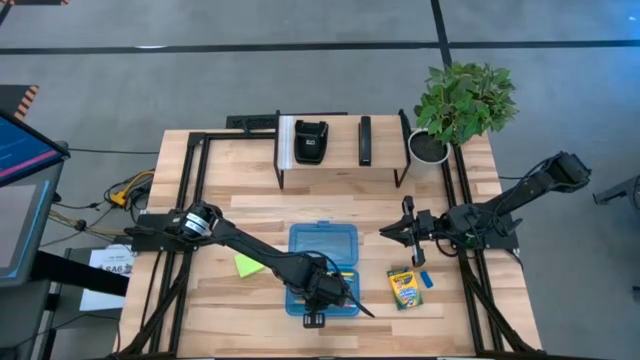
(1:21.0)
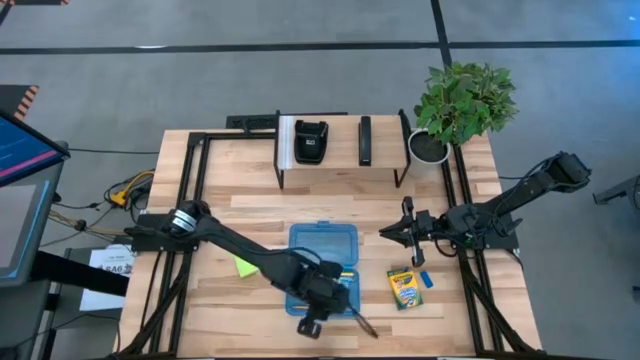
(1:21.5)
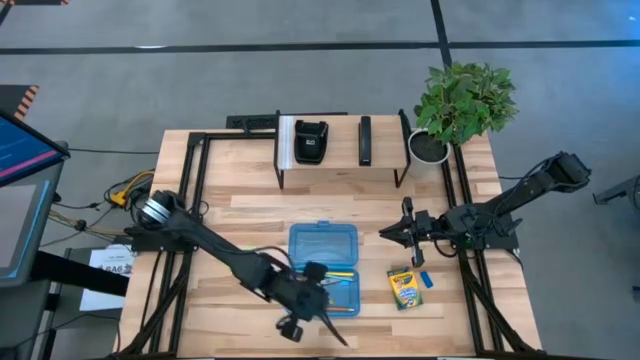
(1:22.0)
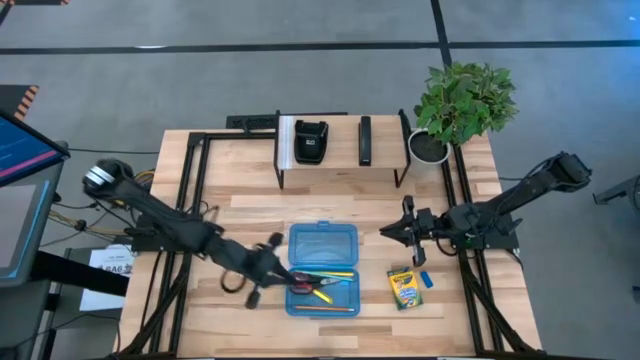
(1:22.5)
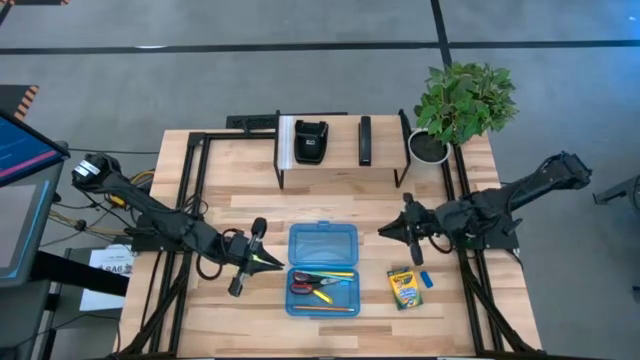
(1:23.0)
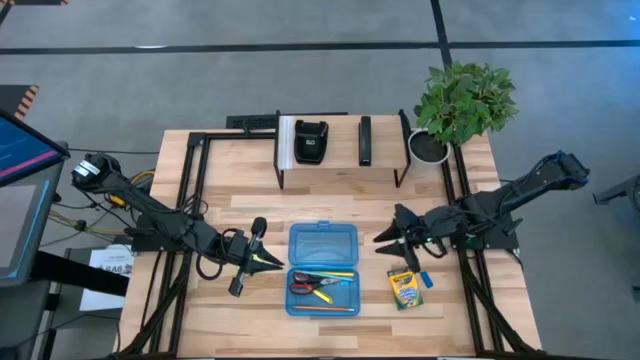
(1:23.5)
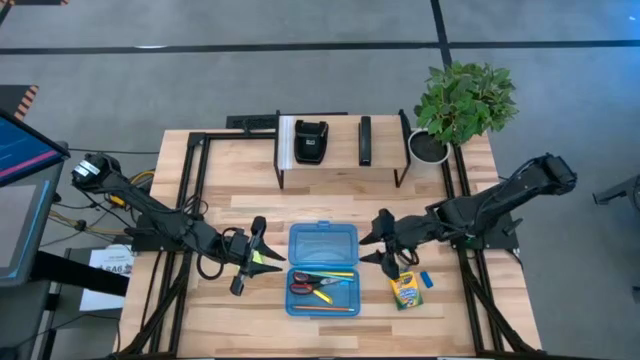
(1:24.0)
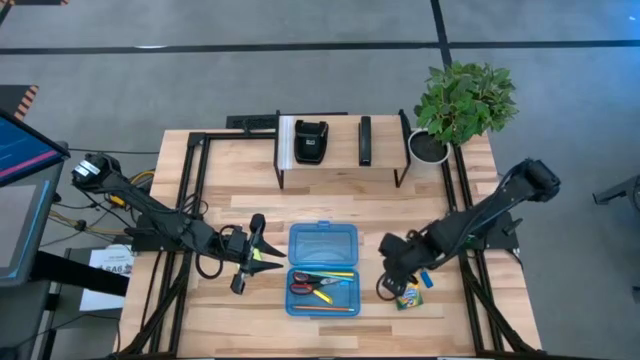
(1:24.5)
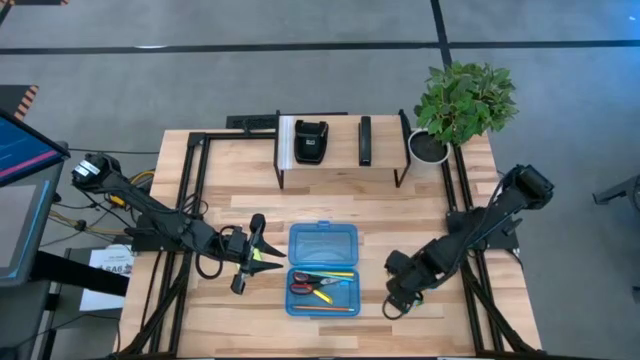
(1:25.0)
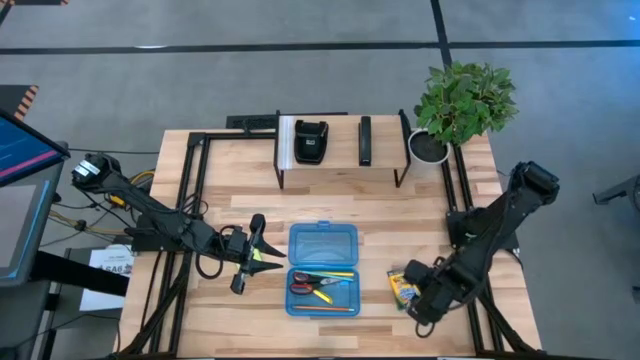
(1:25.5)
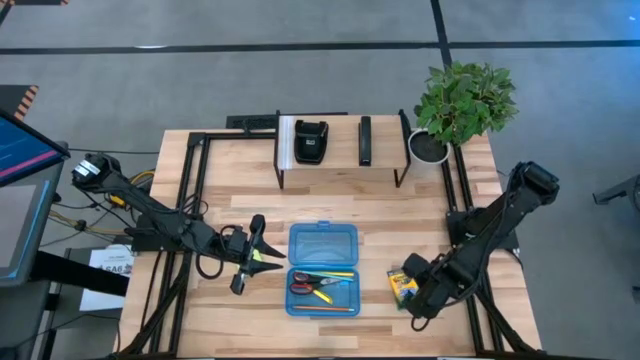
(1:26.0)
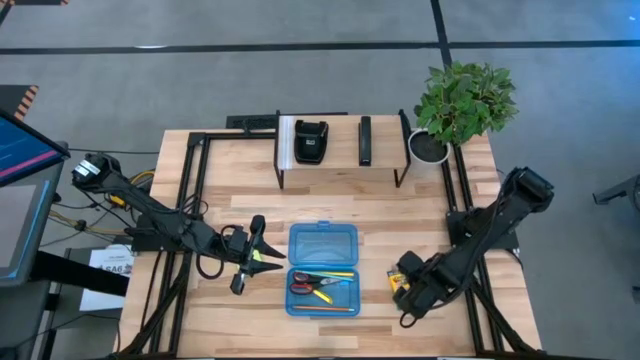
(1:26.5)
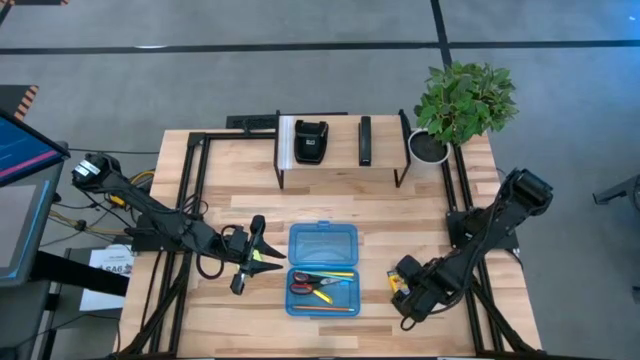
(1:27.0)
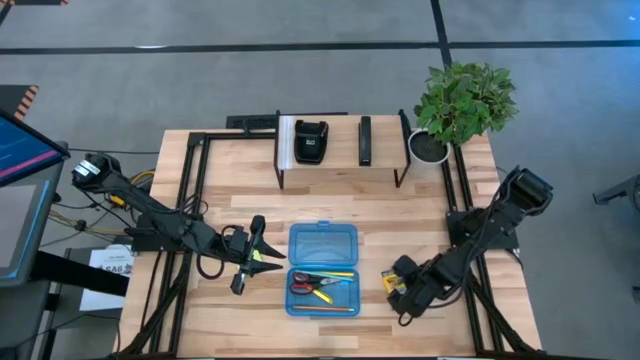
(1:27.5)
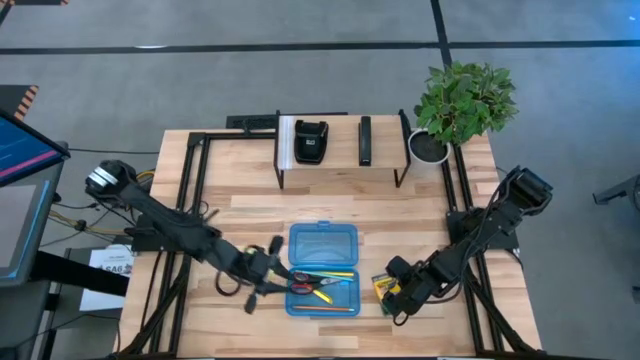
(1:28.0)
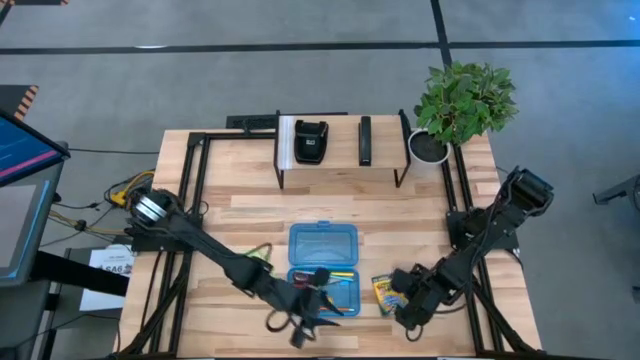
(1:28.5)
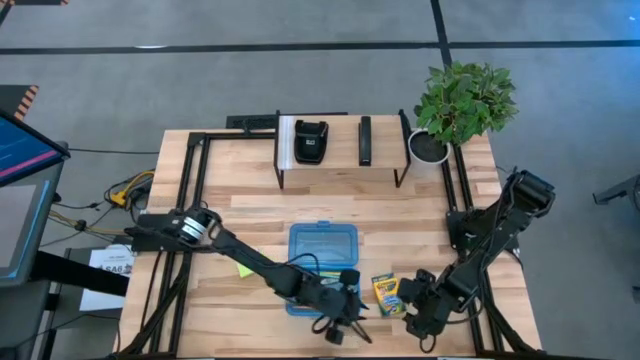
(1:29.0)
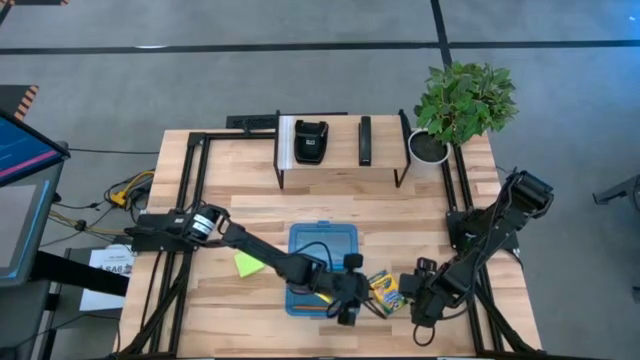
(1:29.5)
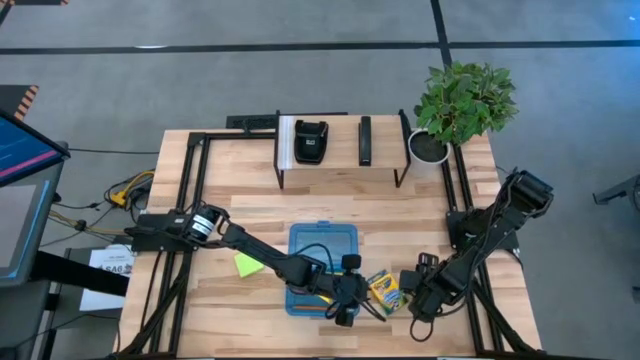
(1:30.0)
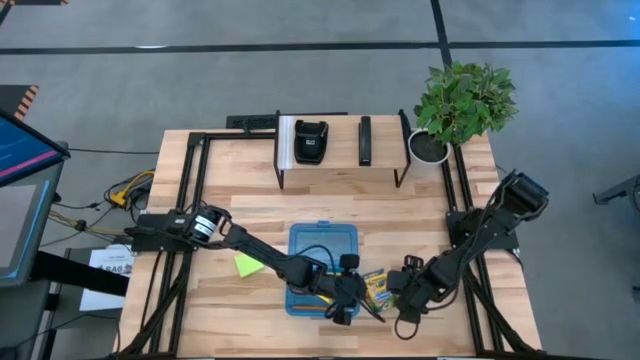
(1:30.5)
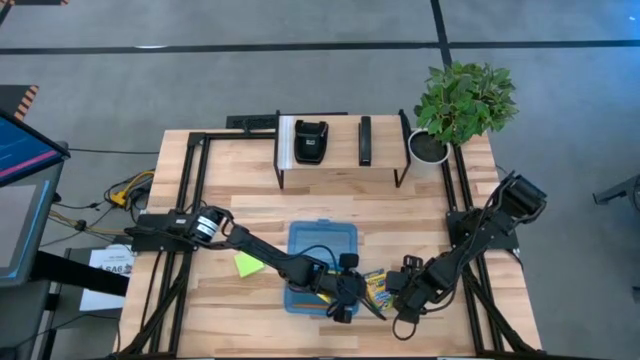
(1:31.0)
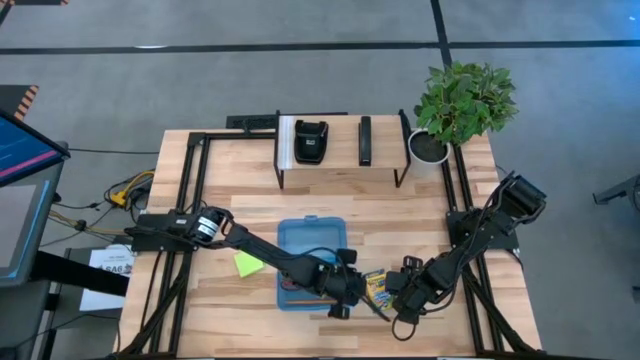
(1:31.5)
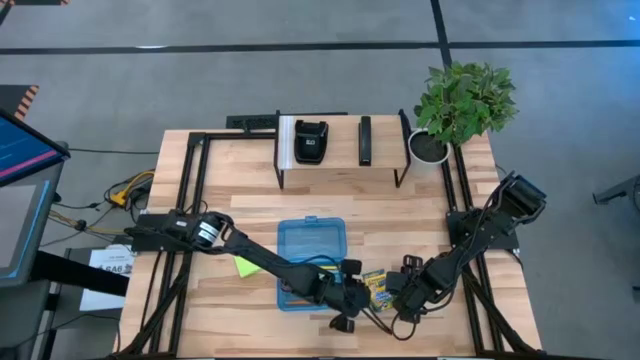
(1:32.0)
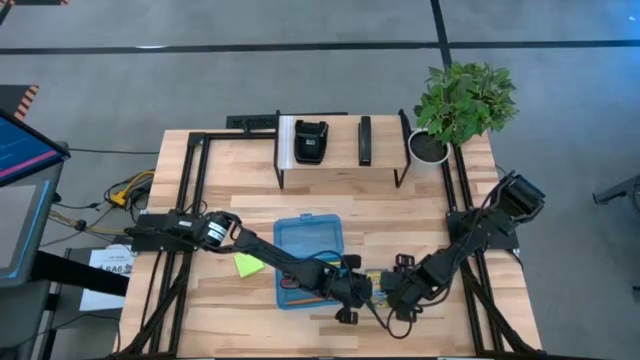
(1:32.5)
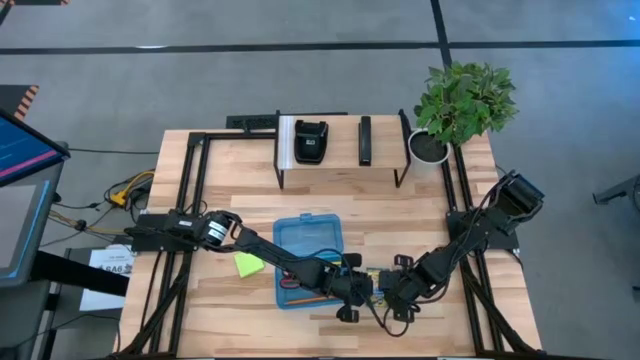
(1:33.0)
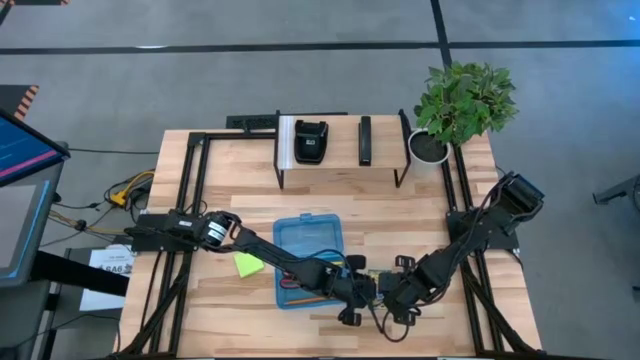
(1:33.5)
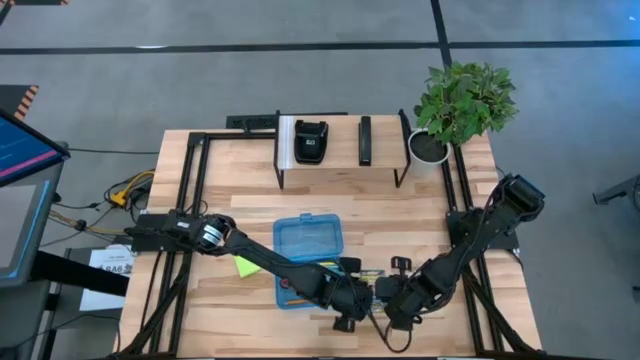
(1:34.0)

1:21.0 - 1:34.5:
Task: Pack school essentials
Put the yellow crayon box into the blue supply box

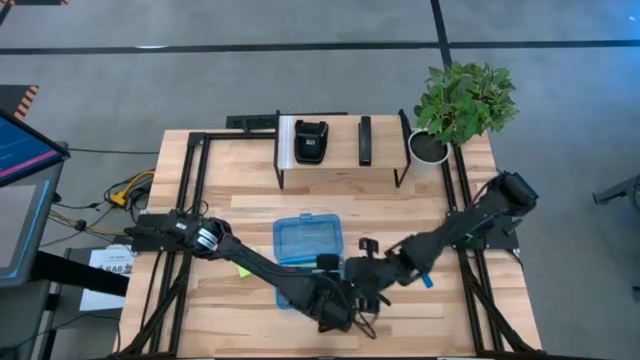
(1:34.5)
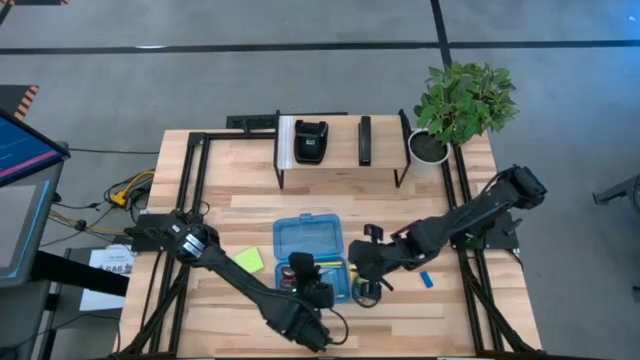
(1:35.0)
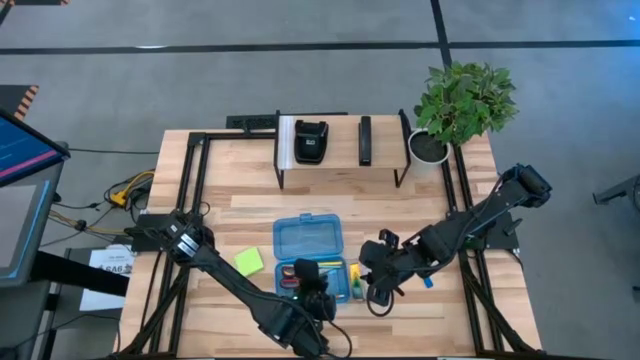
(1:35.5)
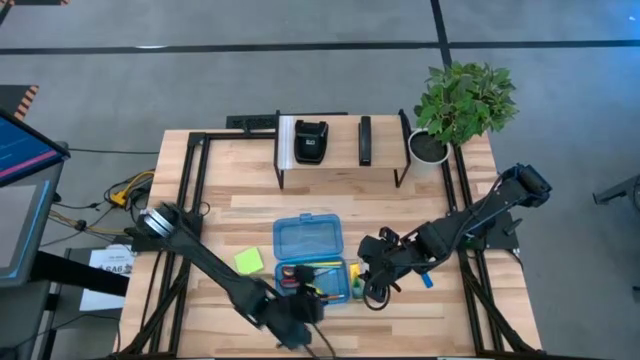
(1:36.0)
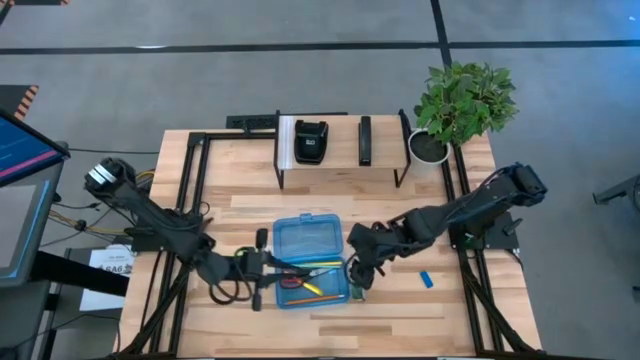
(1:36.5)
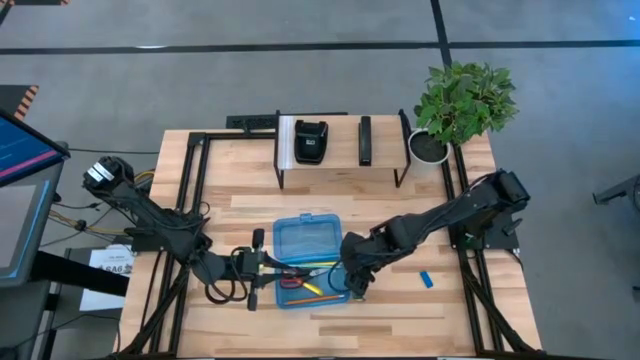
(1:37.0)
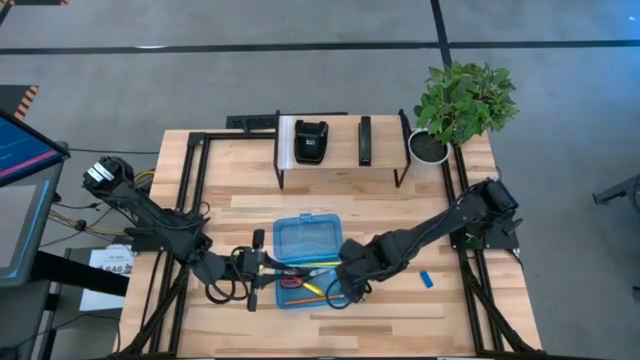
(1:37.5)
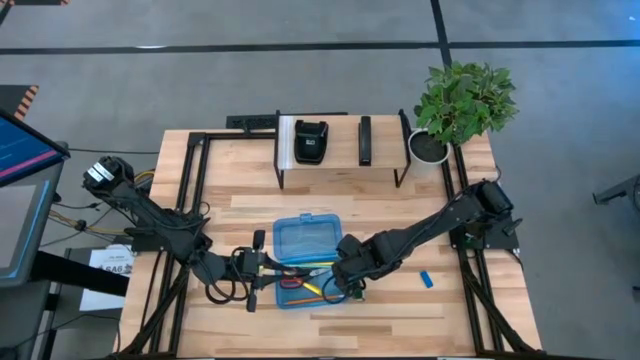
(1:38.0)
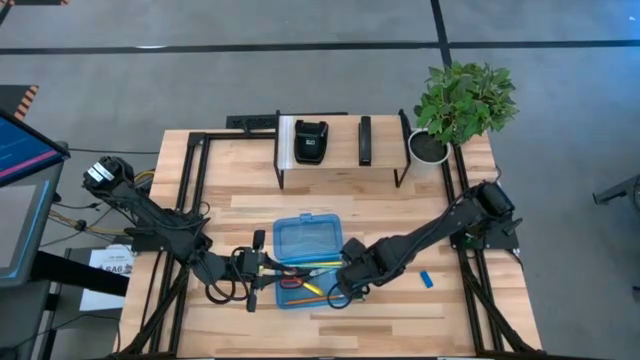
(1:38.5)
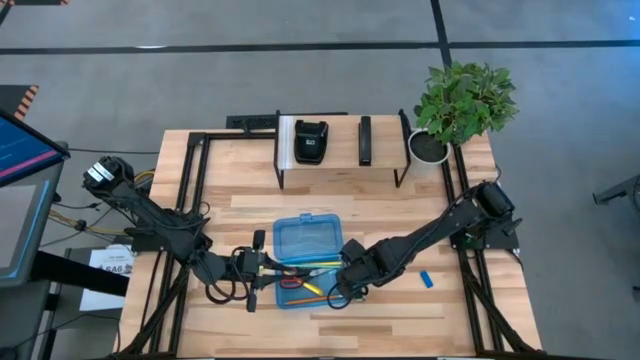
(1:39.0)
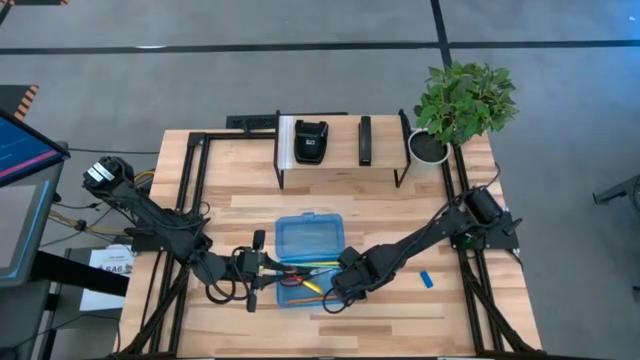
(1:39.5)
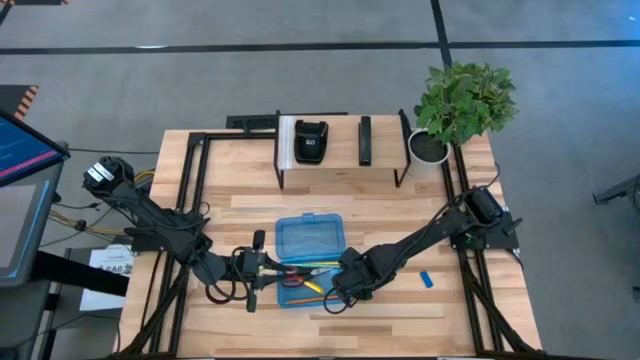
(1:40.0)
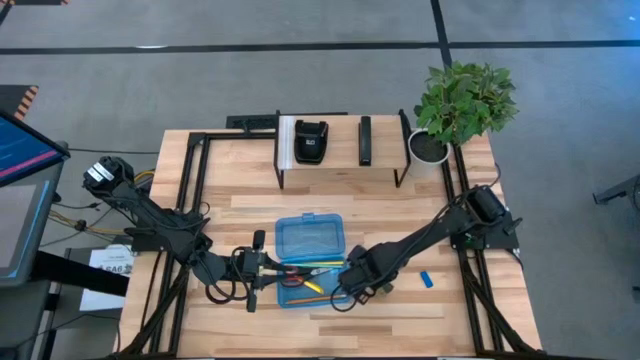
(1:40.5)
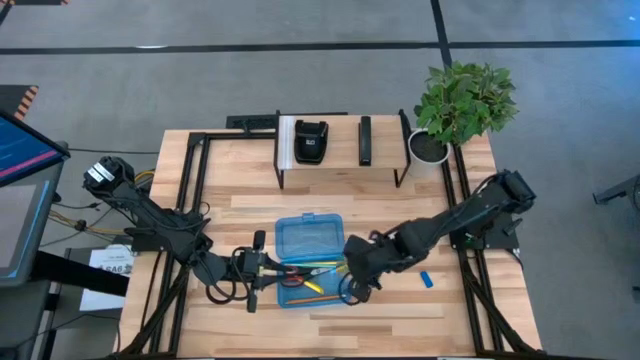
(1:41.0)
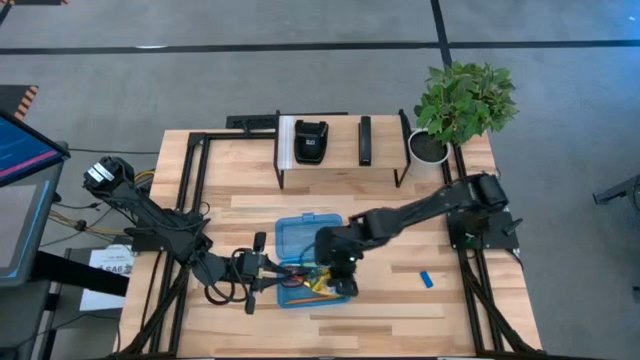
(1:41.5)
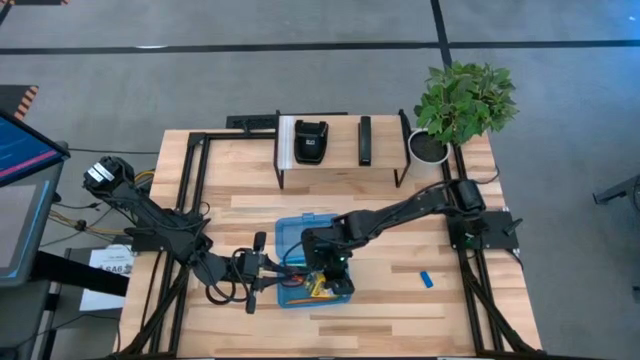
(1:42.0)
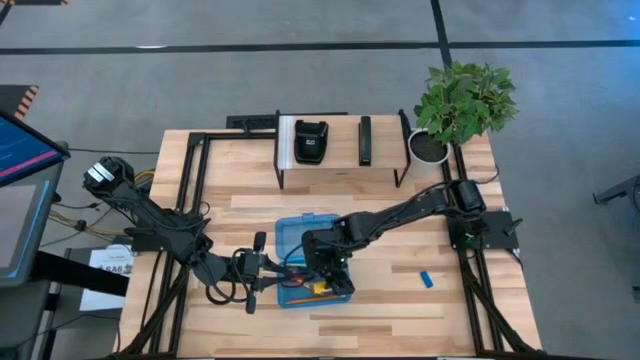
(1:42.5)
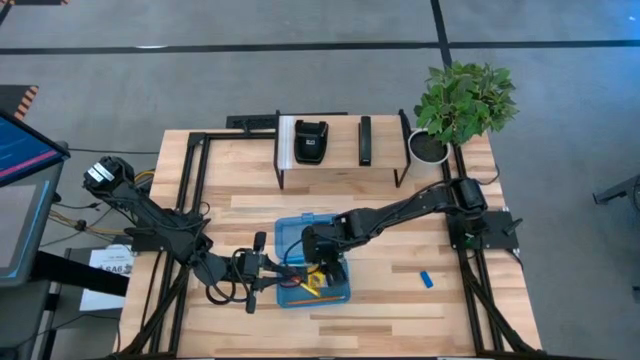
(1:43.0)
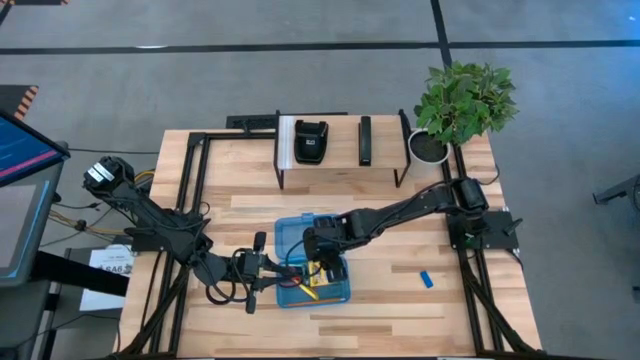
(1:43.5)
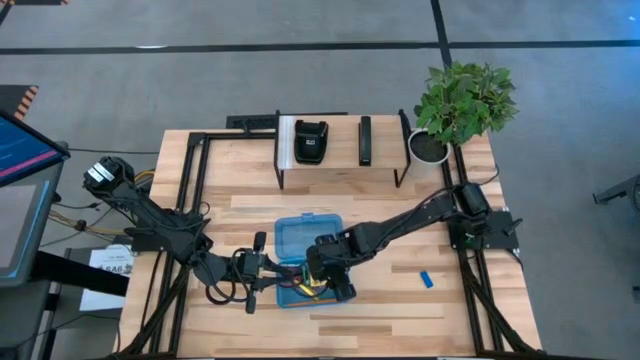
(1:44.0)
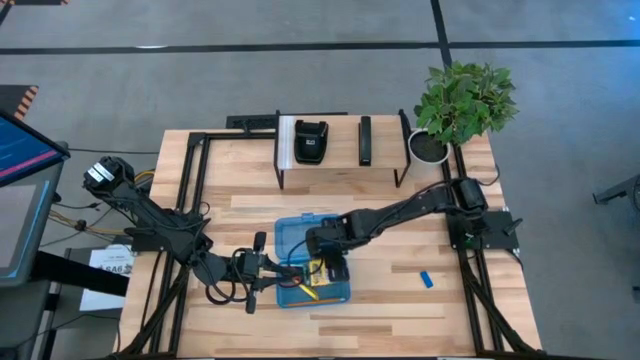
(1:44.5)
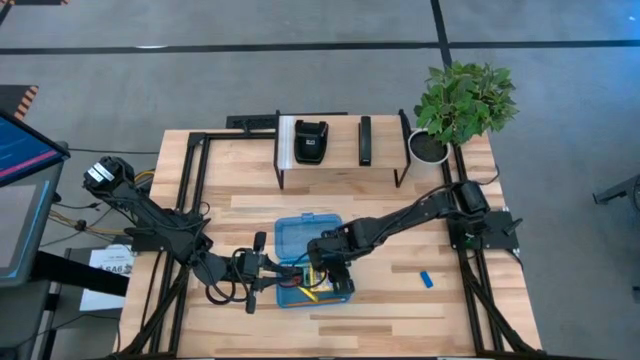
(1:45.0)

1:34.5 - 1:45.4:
Put the yellow crayon box into the blue supply box
